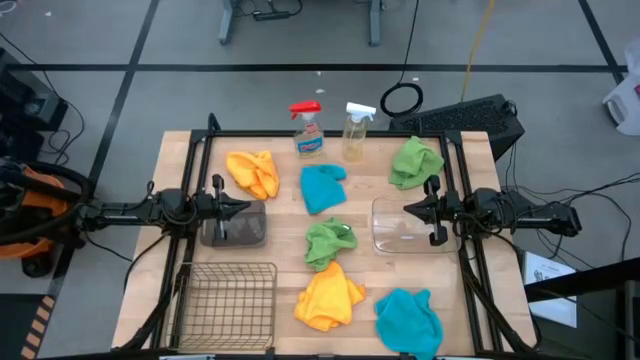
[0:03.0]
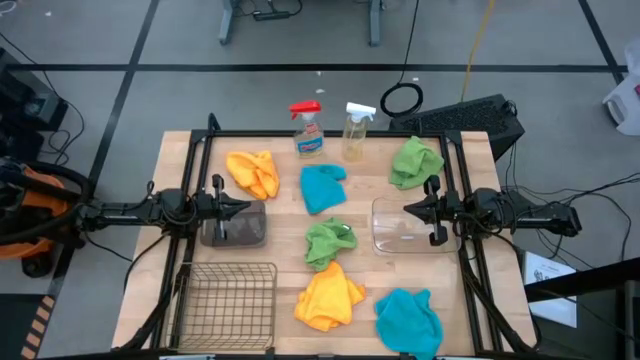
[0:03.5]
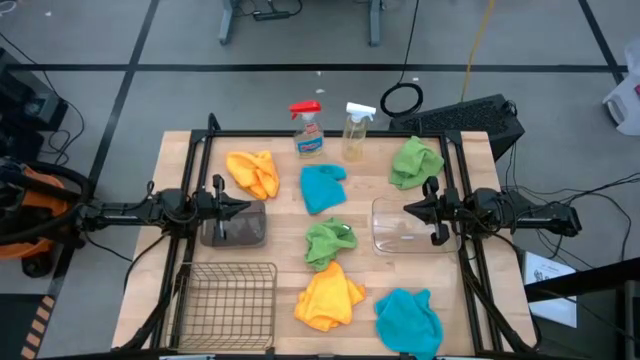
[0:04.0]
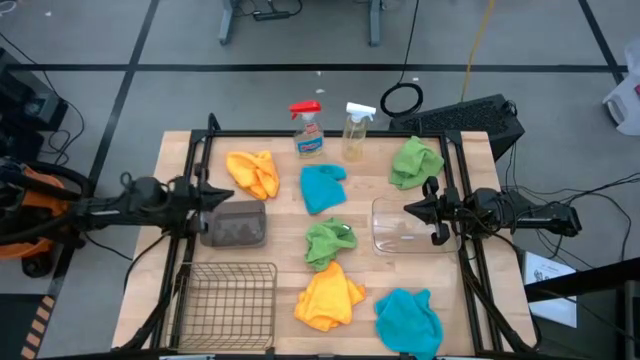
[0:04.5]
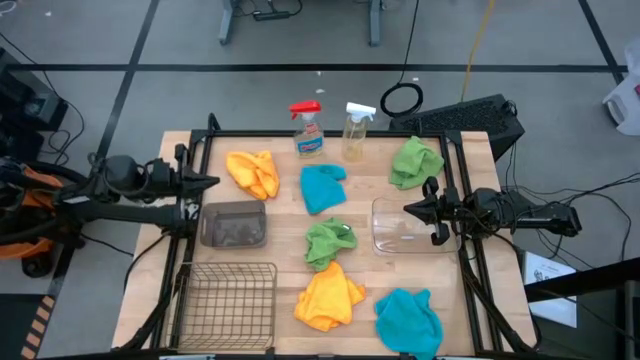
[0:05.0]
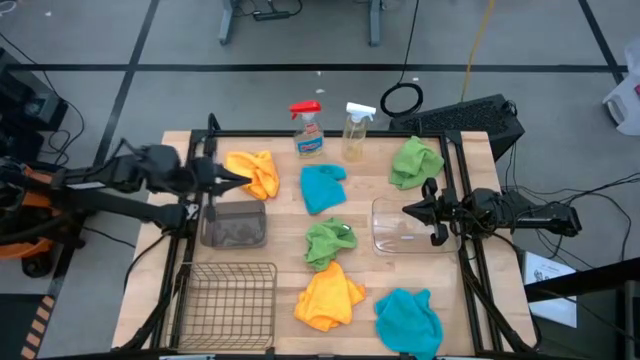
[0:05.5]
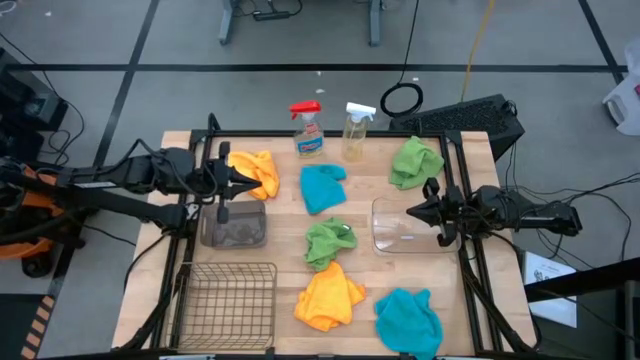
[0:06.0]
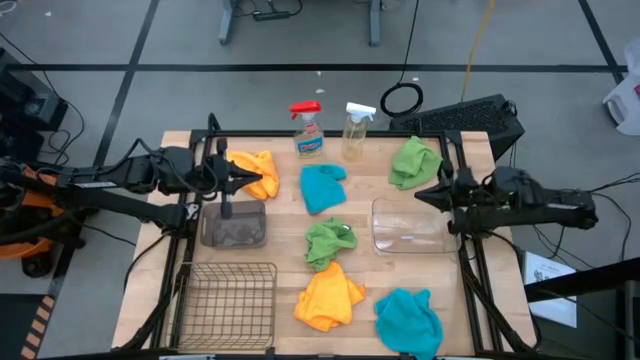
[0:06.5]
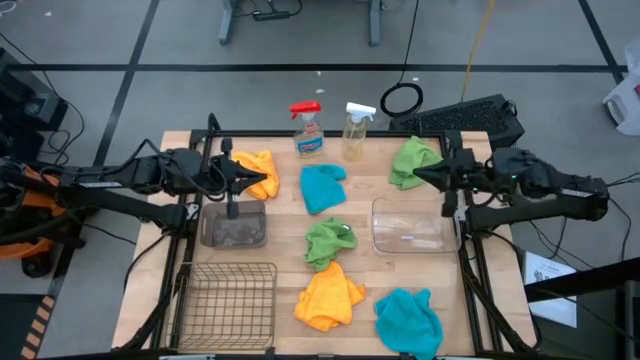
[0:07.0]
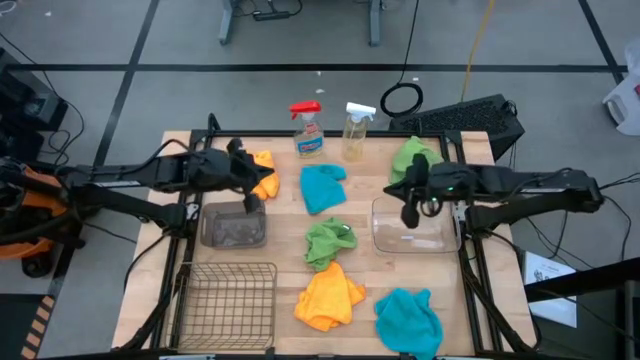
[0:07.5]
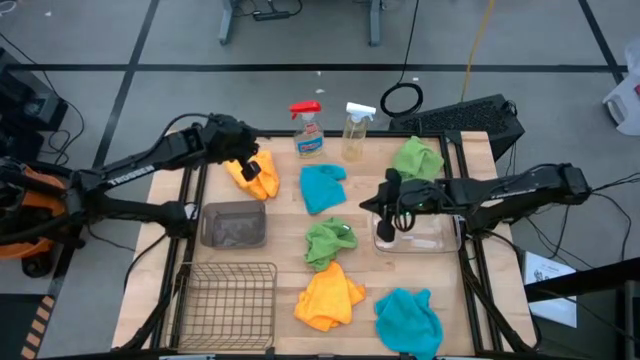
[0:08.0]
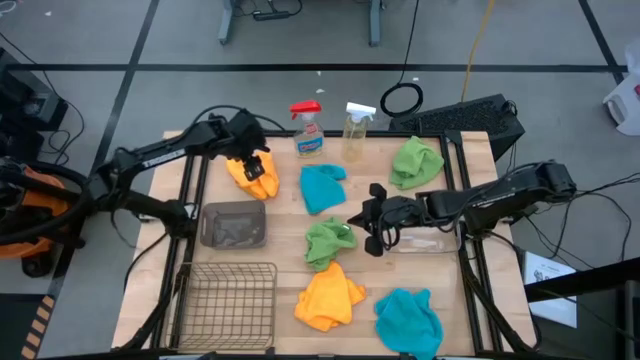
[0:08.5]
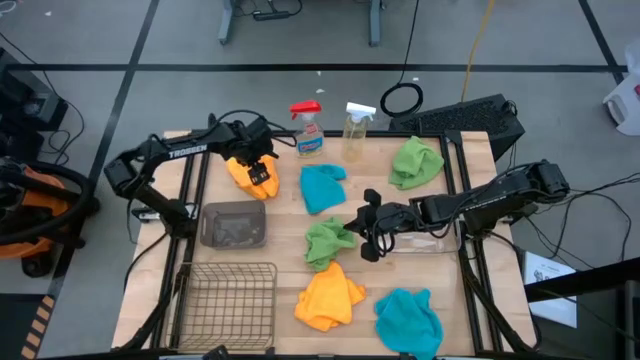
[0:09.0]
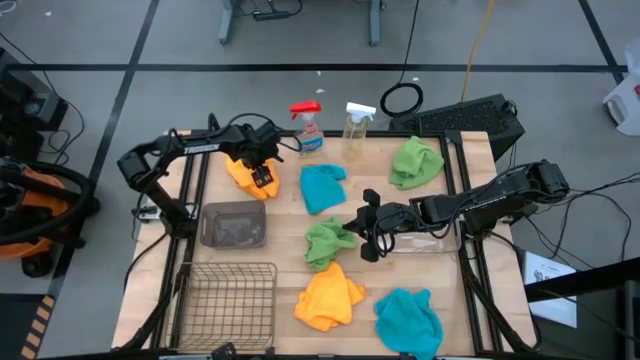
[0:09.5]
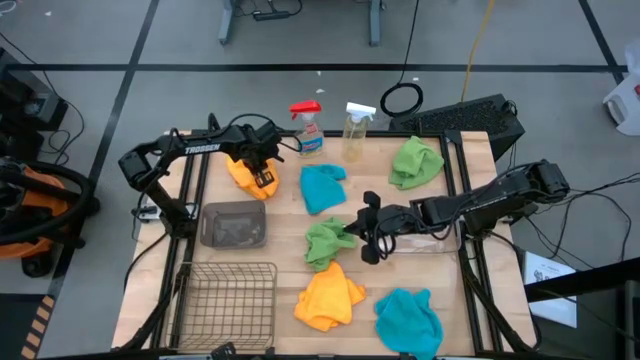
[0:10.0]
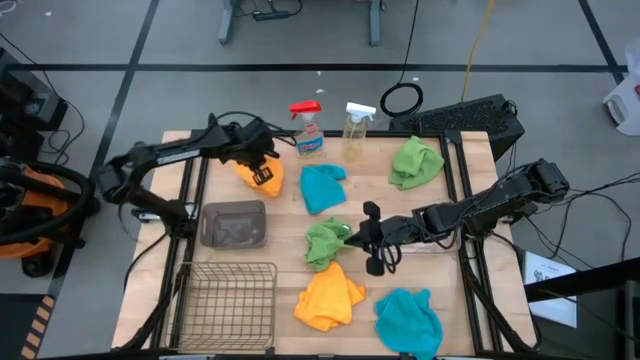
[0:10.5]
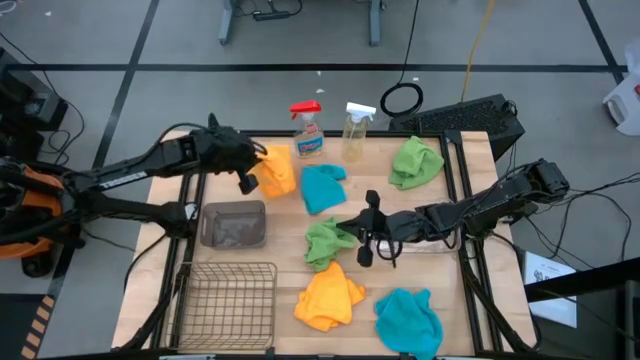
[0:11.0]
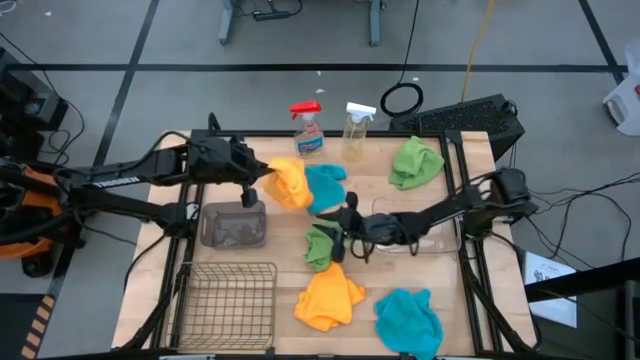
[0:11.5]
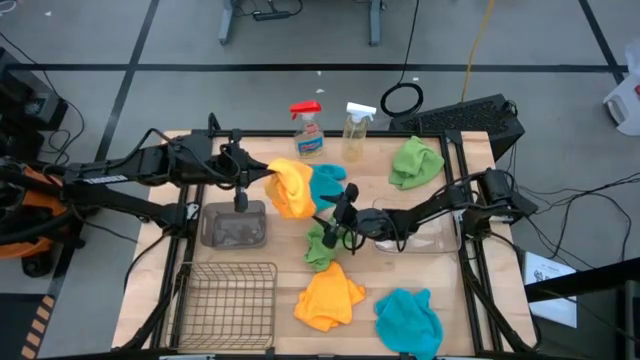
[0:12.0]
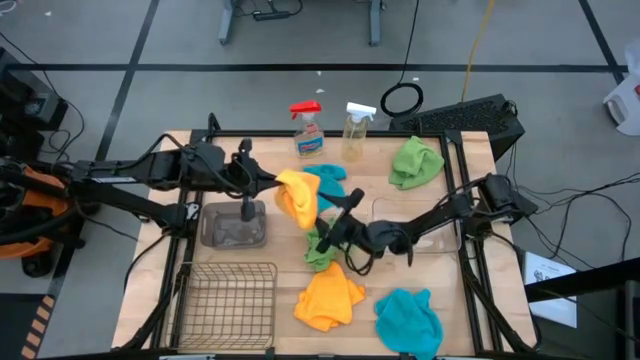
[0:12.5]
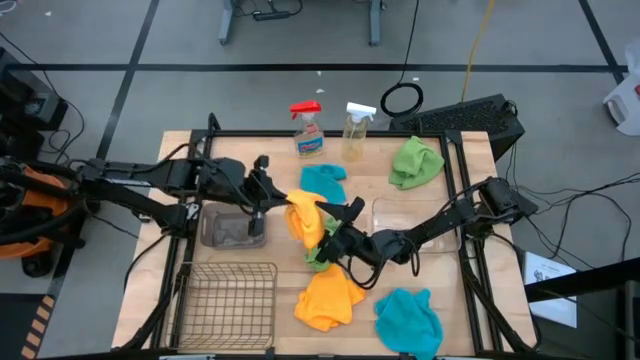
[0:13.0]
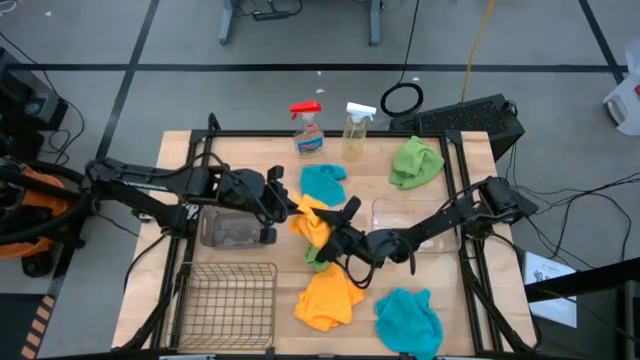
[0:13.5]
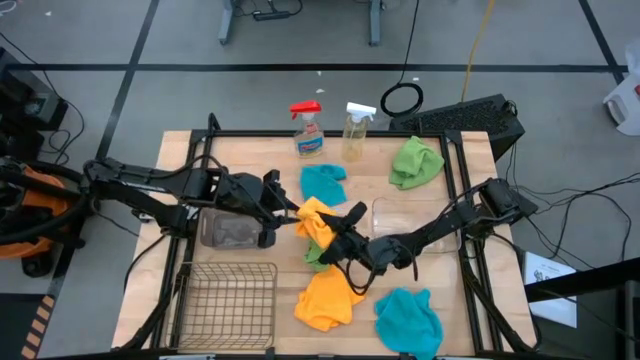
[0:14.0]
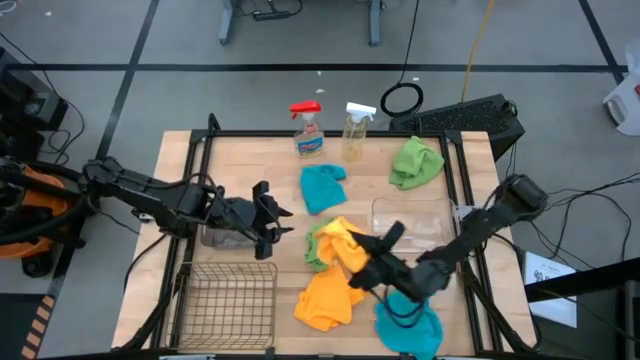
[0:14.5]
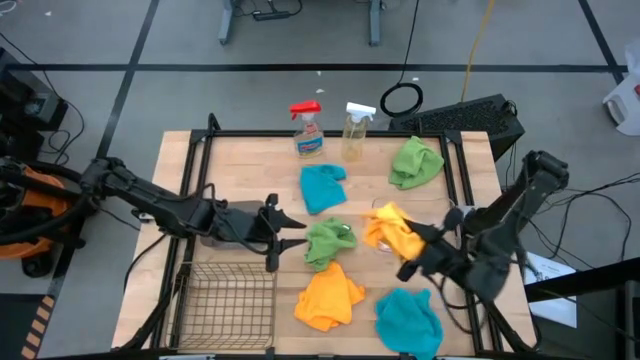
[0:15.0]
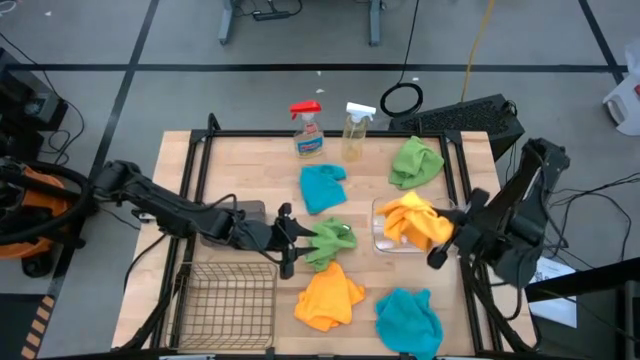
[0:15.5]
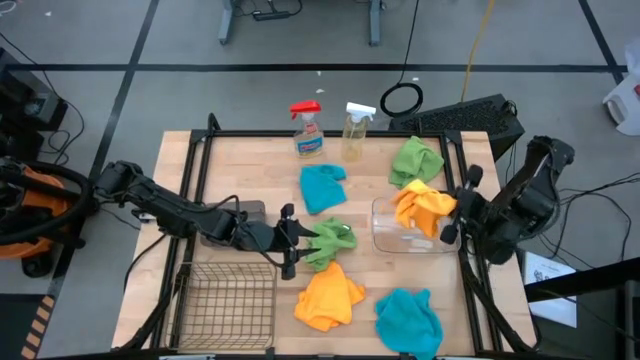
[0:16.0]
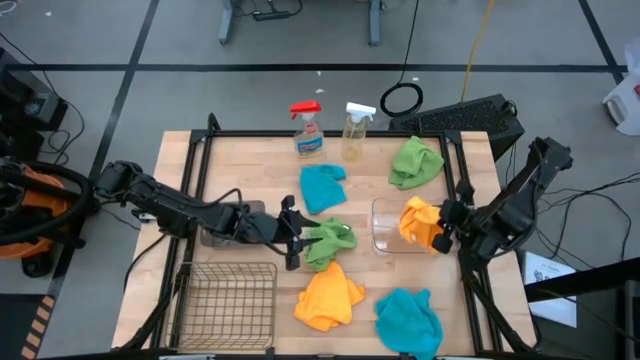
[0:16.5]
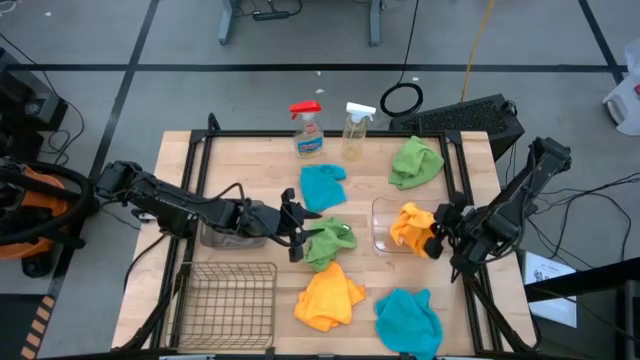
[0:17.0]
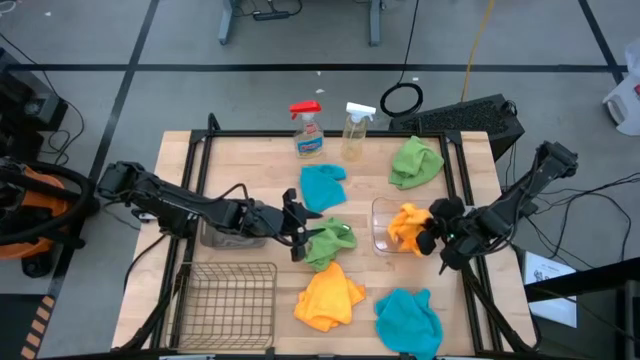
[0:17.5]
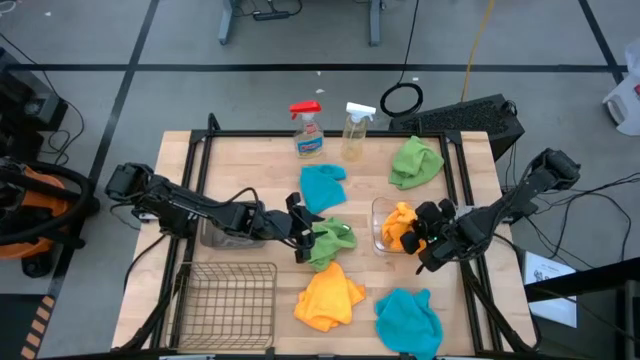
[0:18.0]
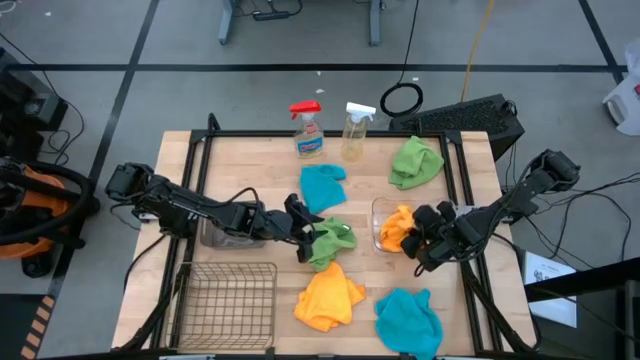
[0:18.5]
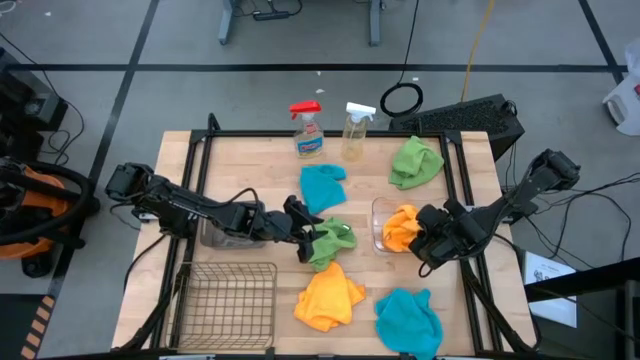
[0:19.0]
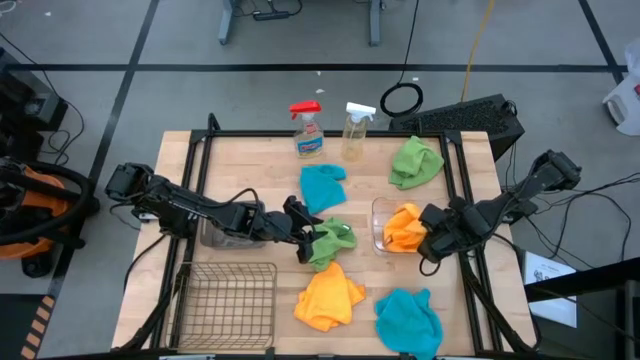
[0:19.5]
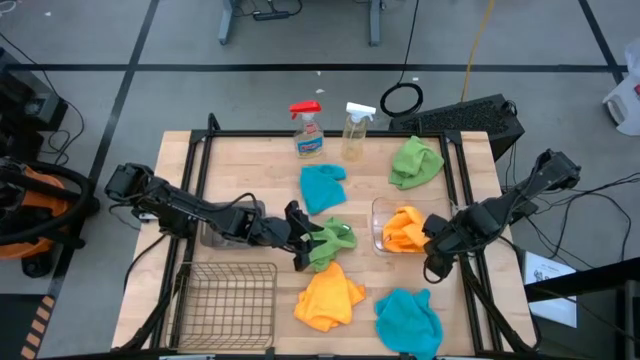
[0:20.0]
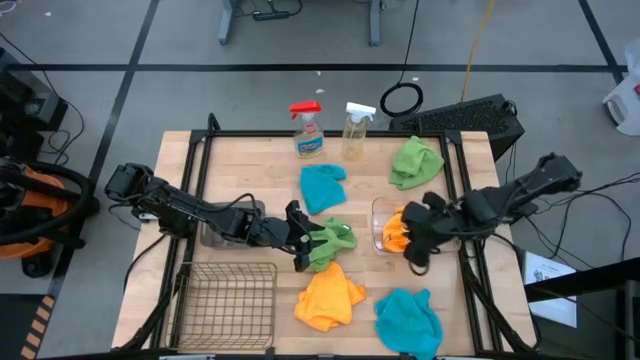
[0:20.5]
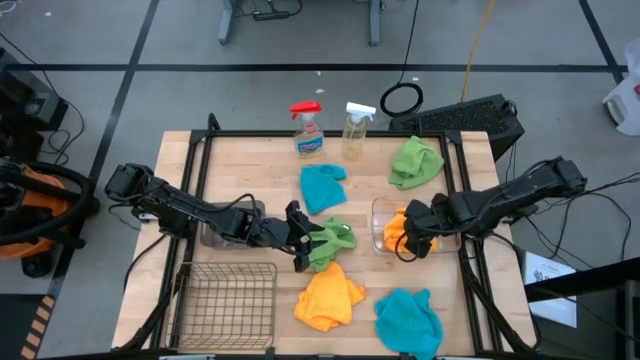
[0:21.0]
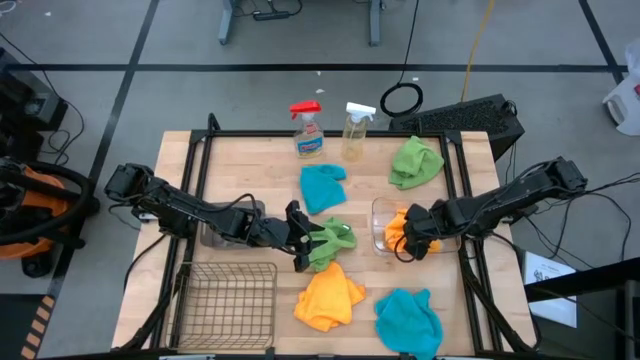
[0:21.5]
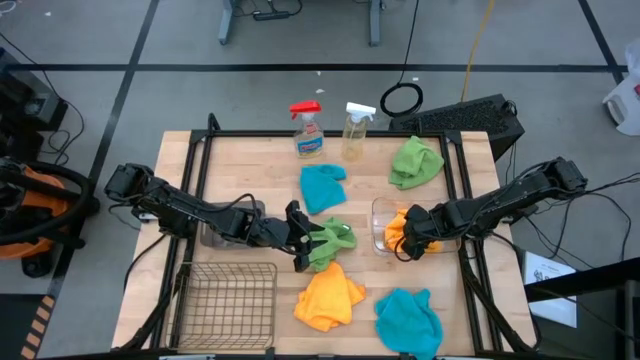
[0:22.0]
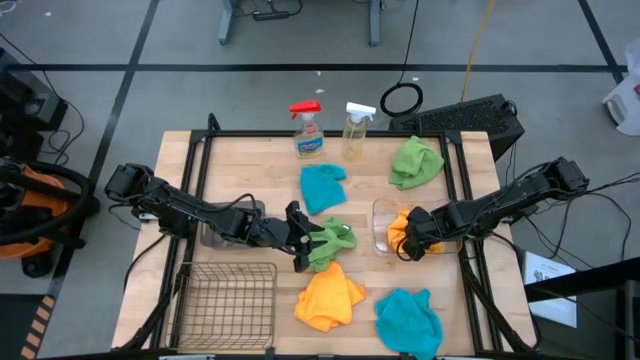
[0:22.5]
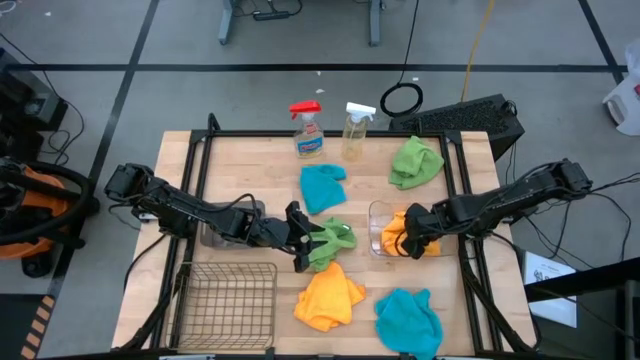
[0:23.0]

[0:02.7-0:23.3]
Task: Sort microfiber towel by color & place in baskets
Put the top orange microfiber towel into the transparent bin

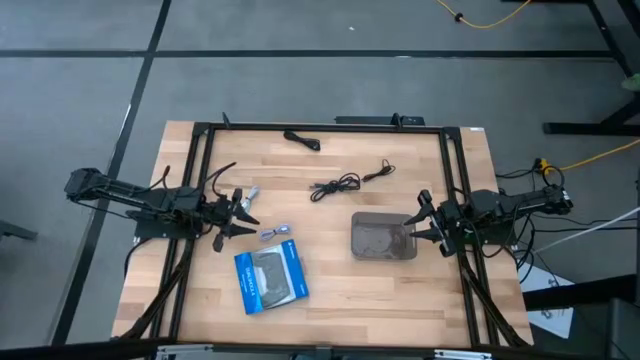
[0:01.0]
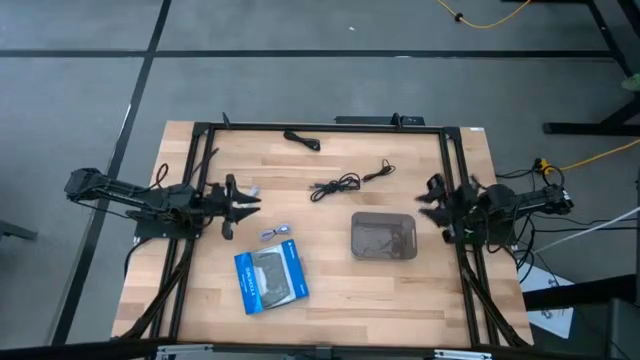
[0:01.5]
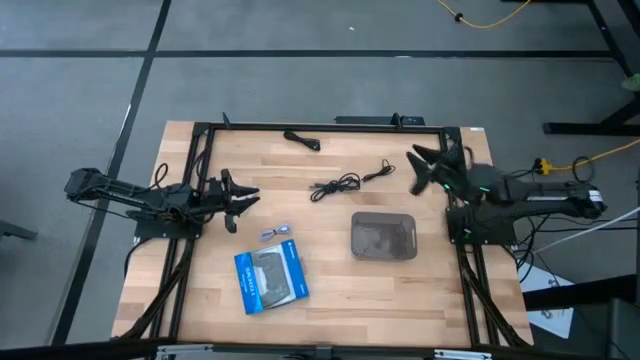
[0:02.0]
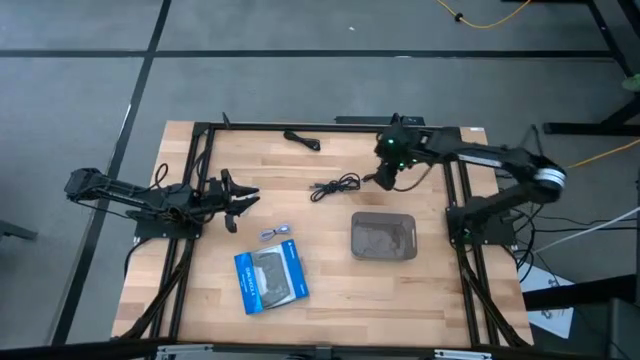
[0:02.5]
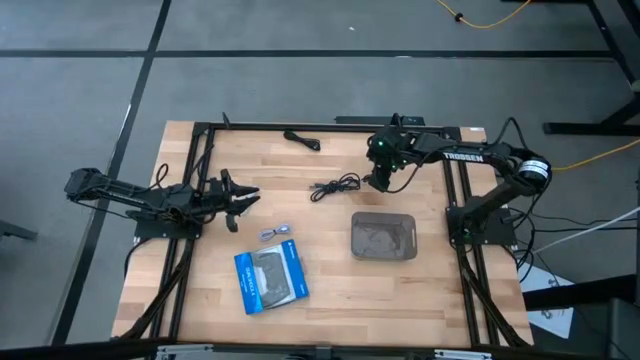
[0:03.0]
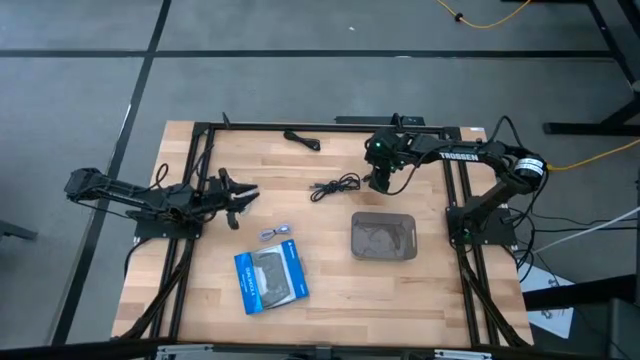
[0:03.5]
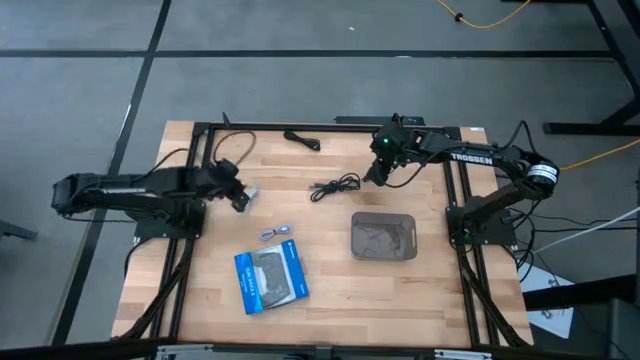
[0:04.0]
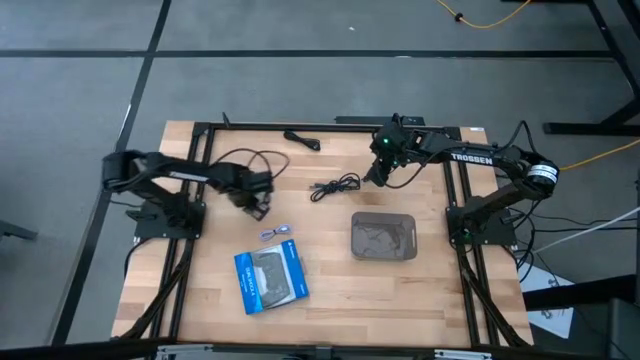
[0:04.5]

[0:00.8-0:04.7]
Task: Pick and place USB-C Cables
Adjust the top white charger cable
